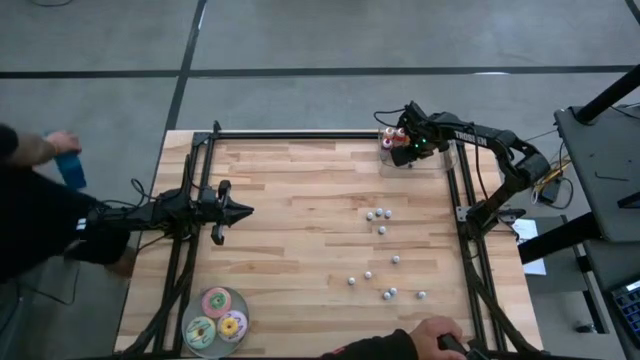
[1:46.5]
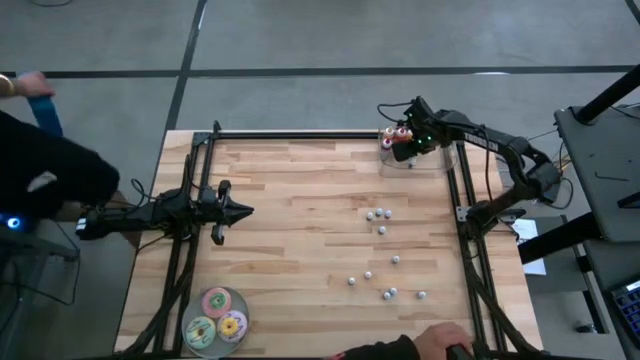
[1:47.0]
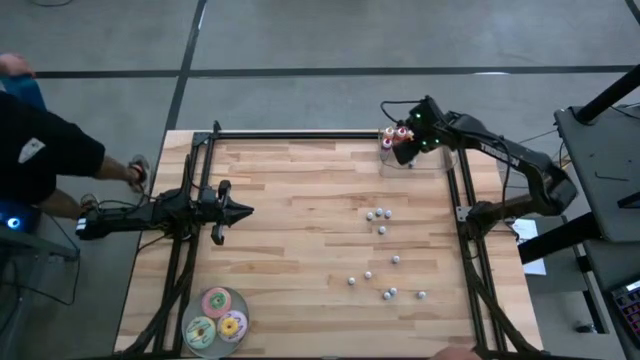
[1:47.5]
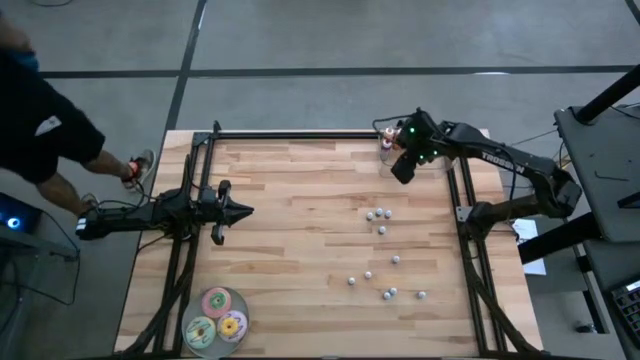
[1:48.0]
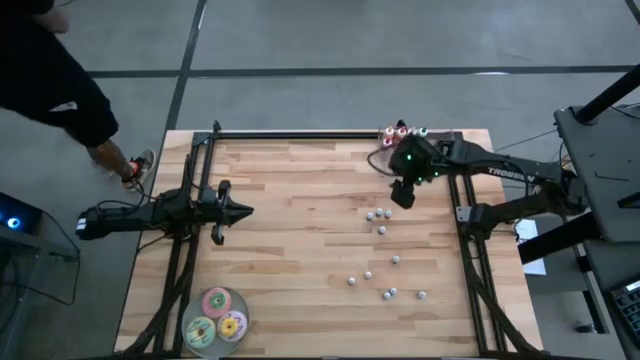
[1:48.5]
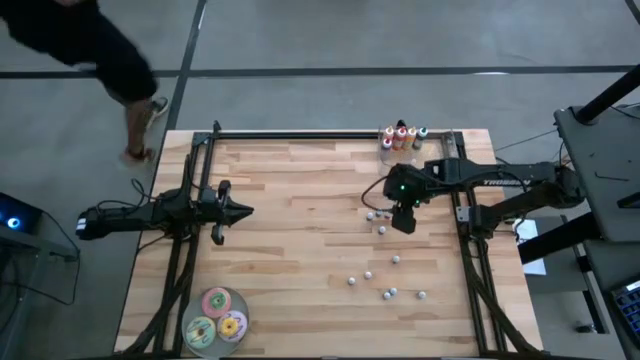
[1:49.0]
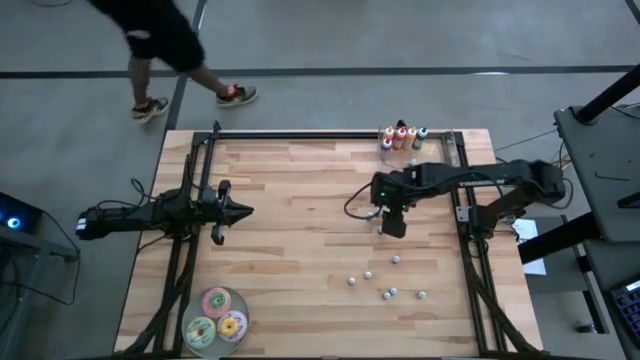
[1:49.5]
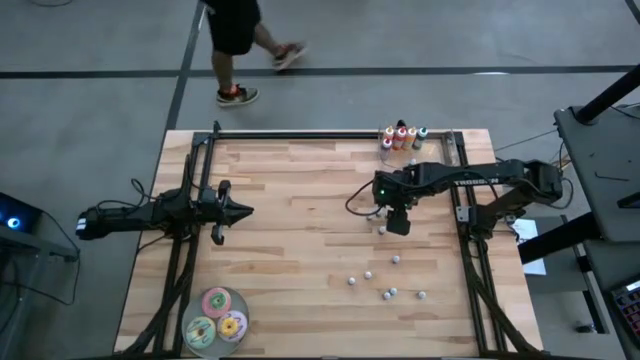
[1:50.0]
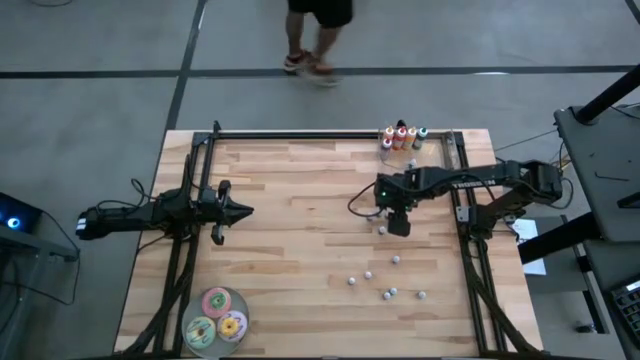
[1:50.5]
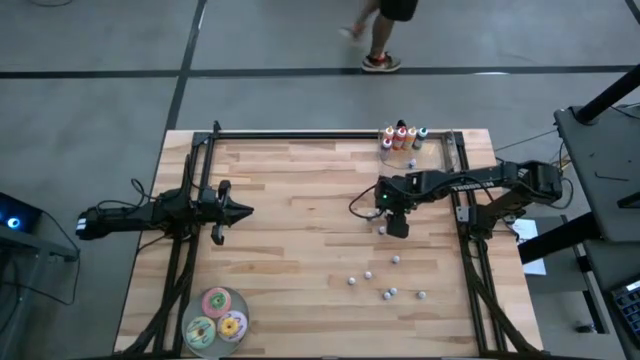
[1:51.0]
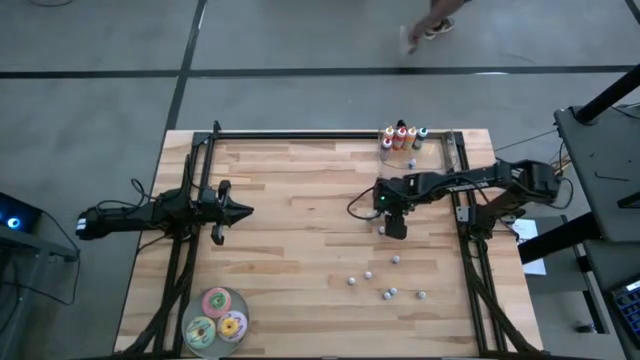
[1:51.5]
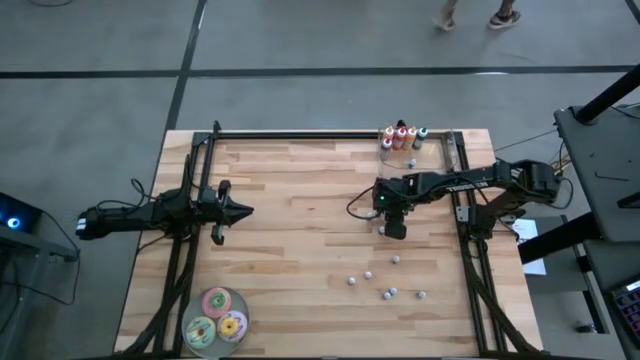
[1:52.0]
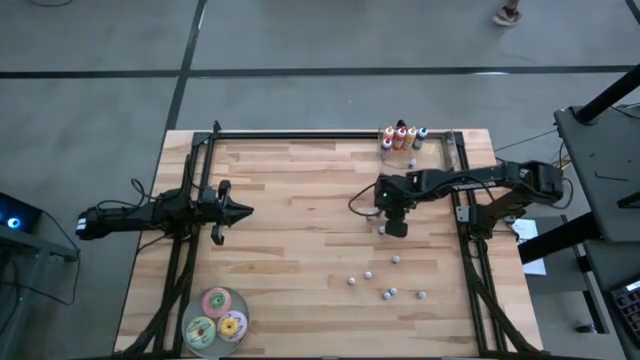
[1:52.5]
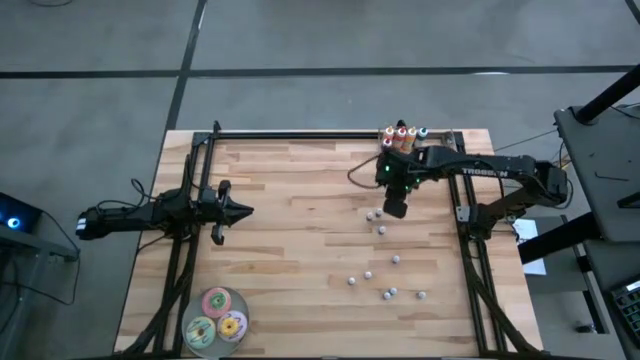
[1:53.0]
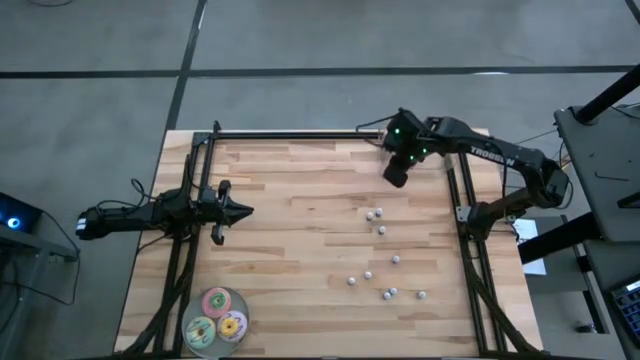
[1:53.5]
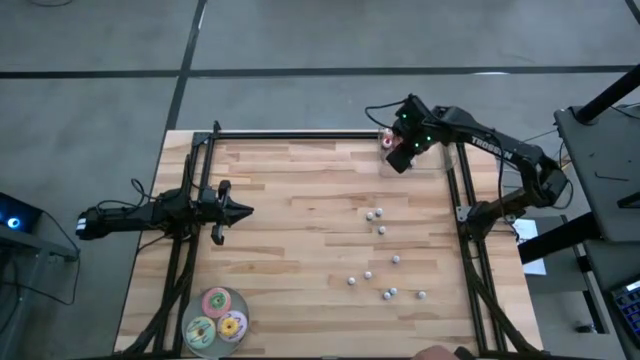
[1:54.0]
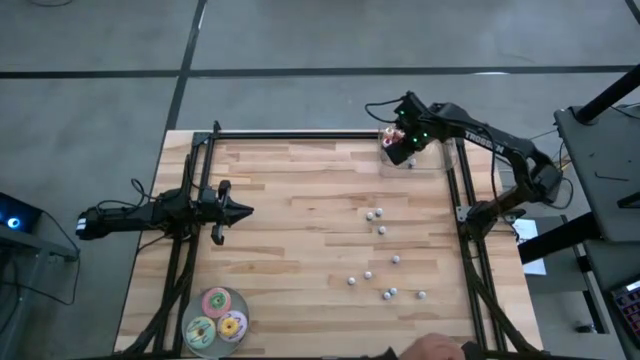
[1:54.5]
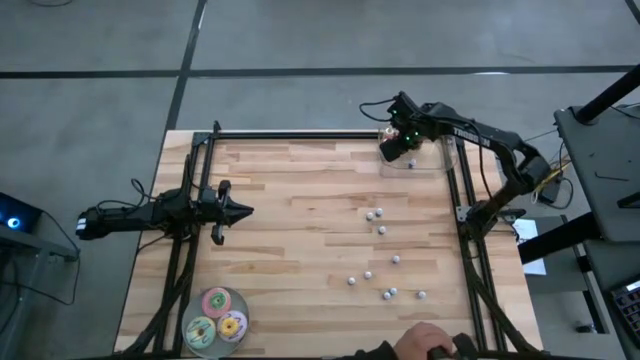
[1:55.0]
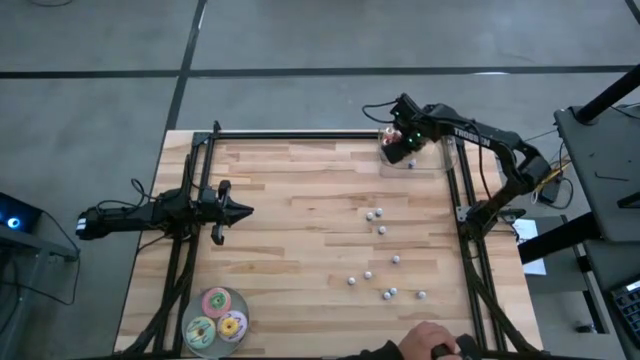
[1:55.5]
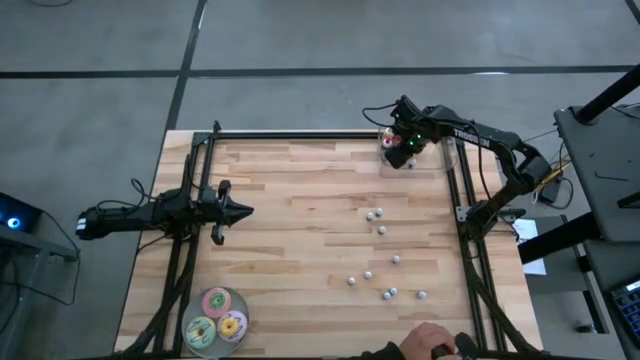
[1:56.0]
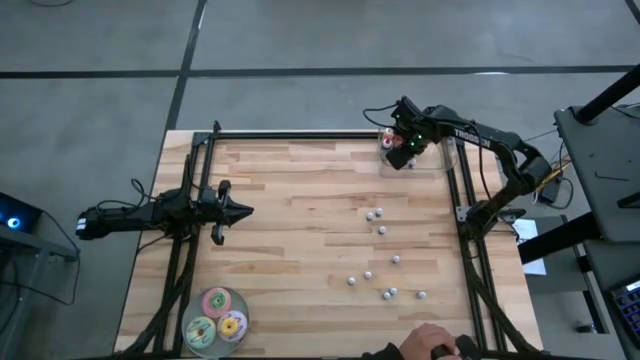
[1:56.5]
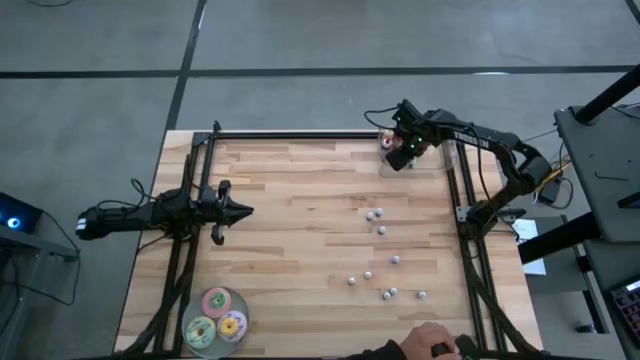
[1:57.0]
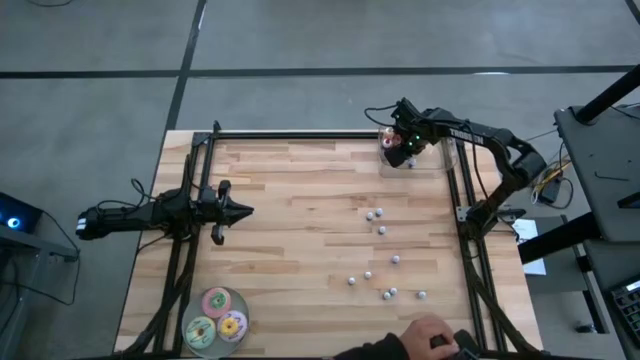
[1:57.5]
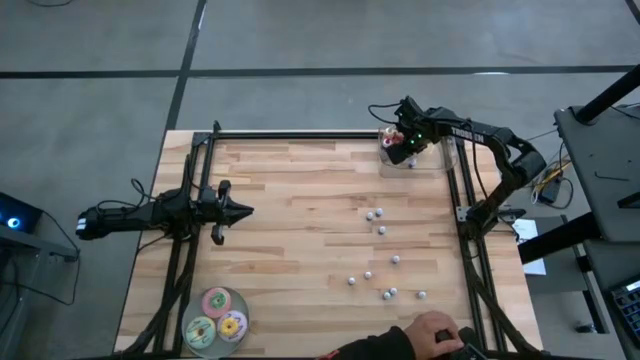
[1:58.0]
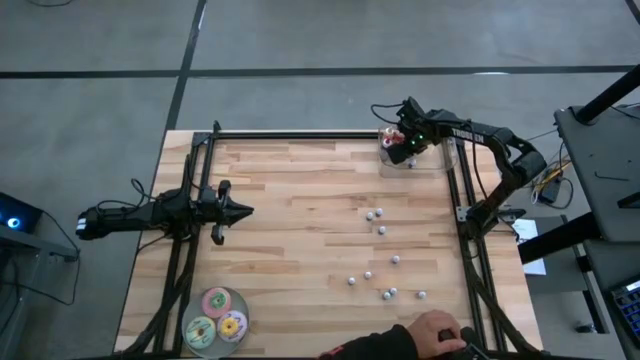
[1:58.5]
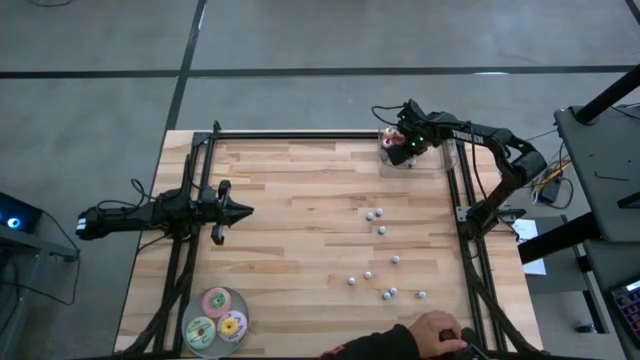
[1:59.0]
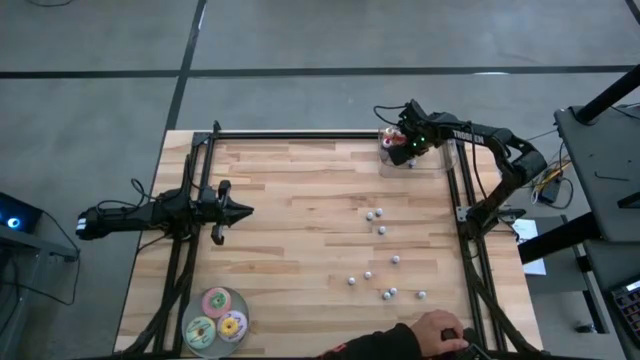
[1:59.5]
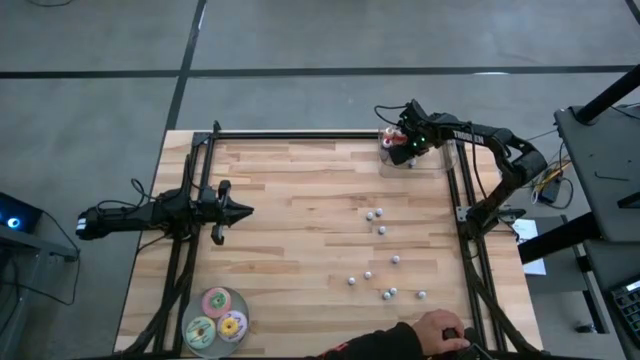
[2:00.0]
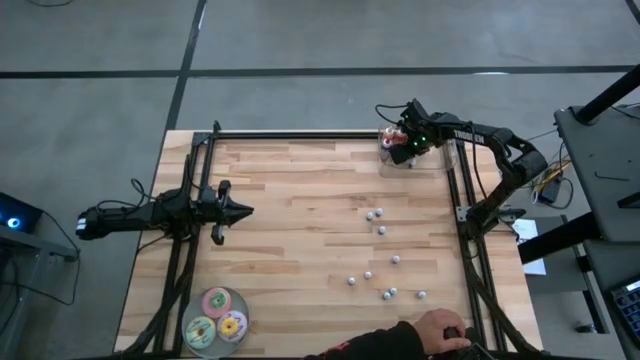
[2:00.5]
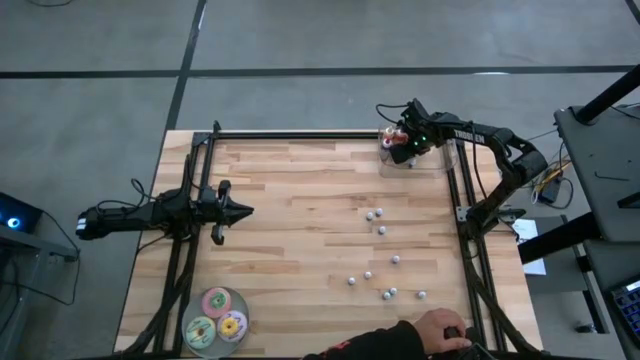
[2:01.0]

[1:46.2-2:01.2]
Task: Pick & Place food coloring
Put the top small red food coloring bottle into the bin

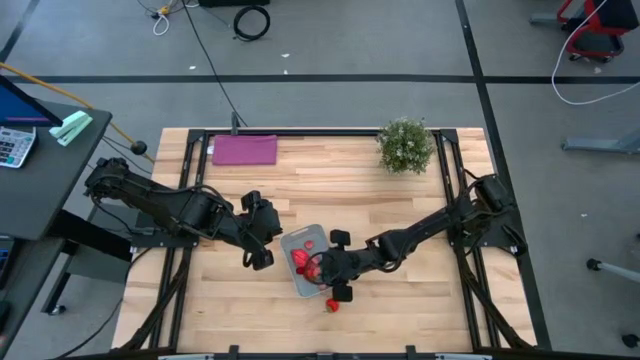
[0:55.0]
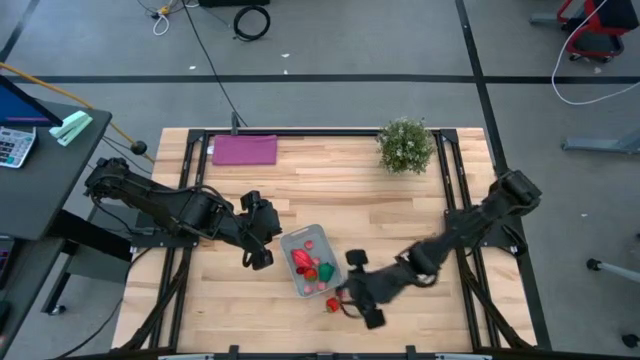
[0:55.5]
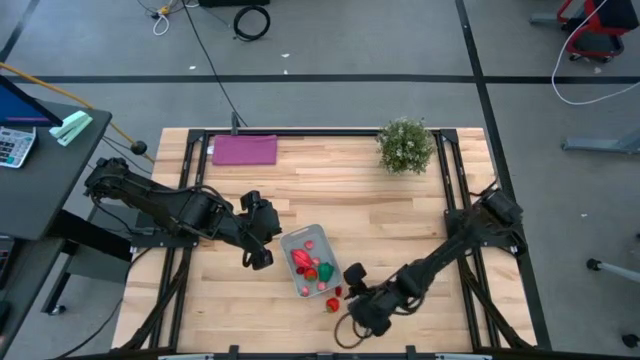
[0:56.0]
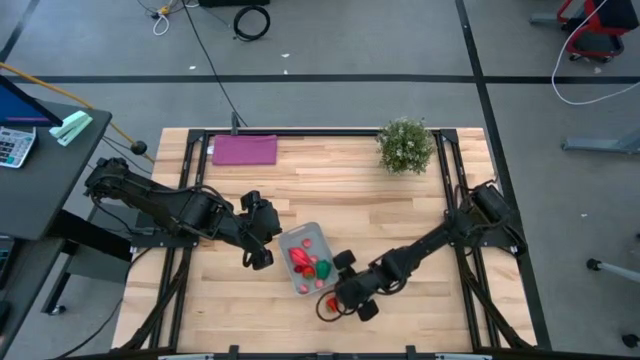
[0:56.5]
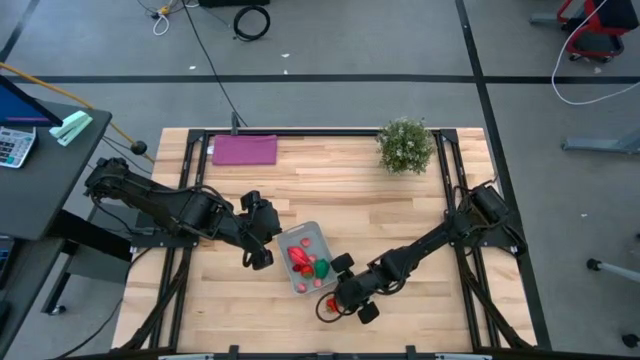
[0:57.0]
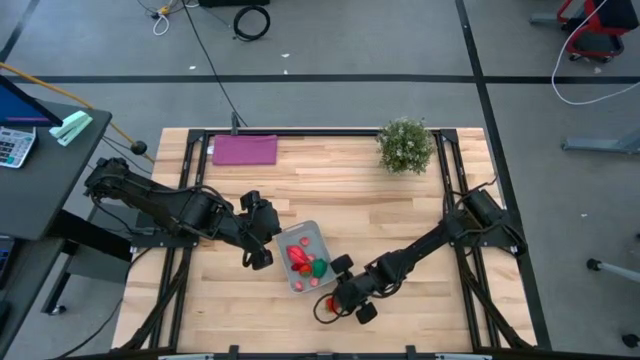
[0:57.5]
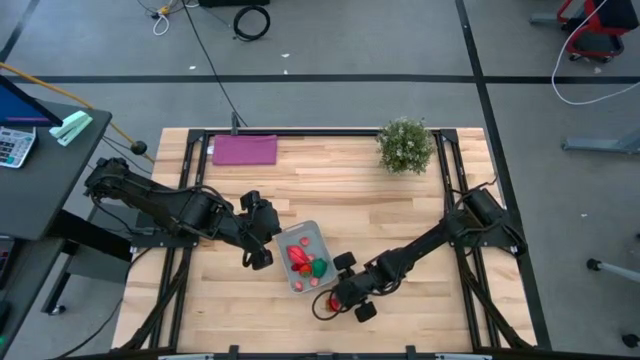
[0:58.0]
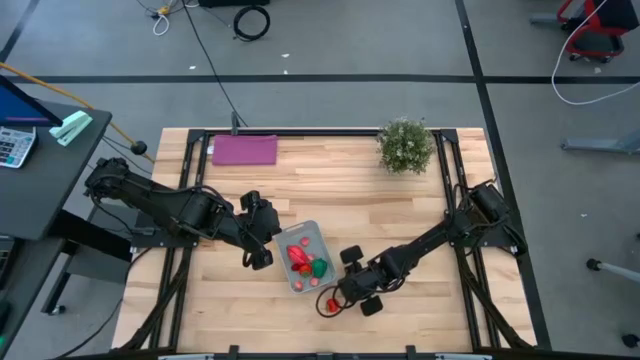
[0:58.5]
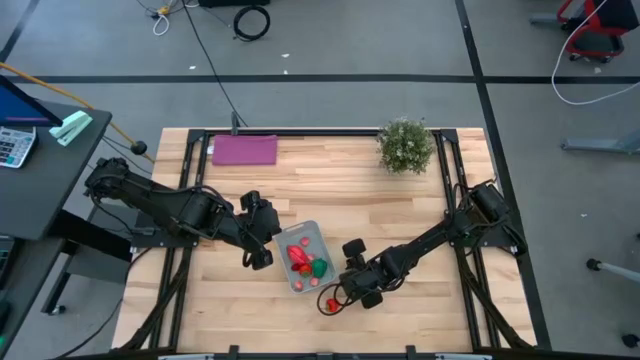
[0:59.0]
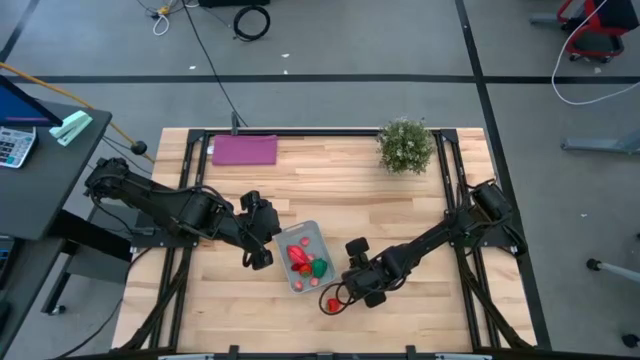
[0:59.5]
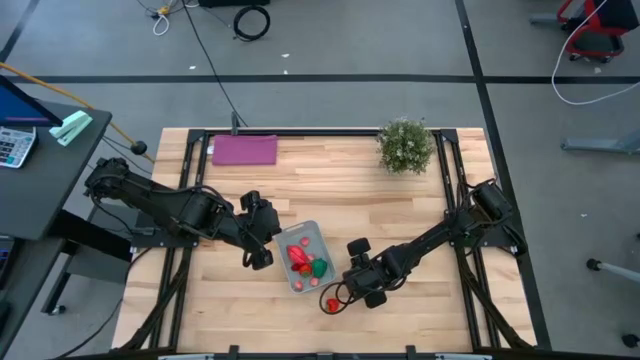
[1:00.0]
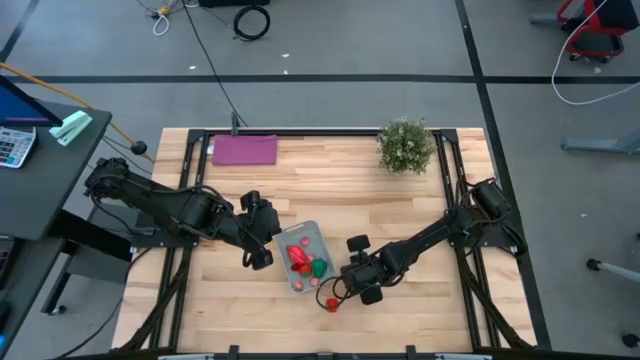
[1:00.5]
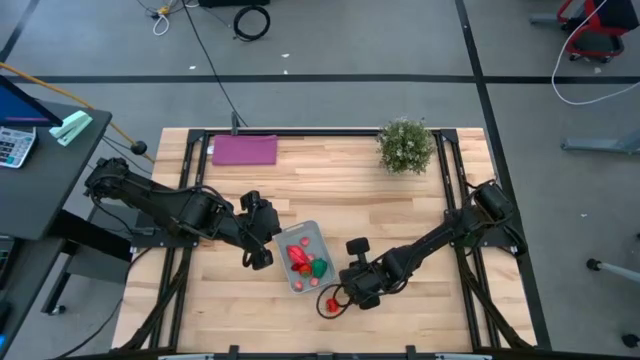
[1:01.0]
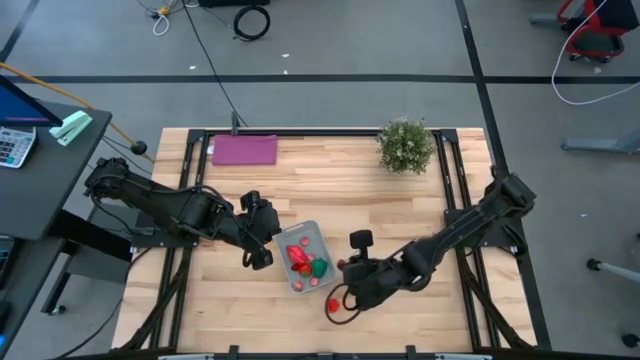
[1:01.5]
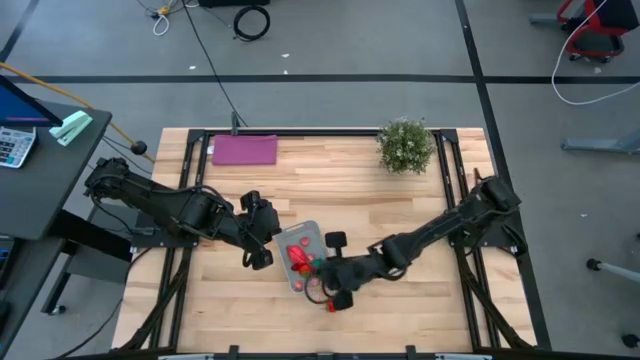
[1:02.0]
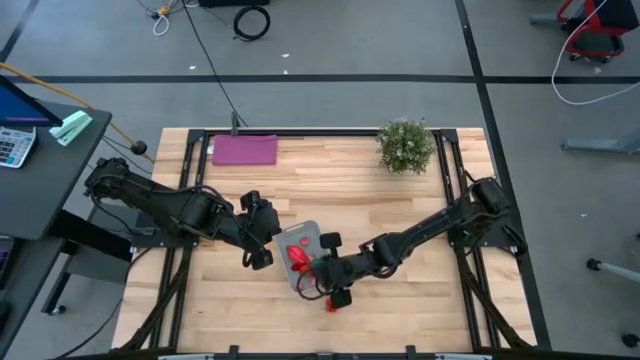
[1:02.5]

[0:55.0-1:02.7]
Task: Pick and placing Produce into tupperware
Put the red cherry into the gray bin
